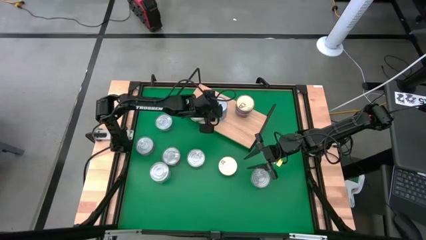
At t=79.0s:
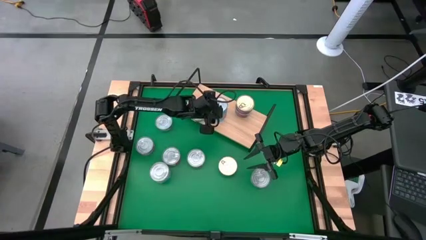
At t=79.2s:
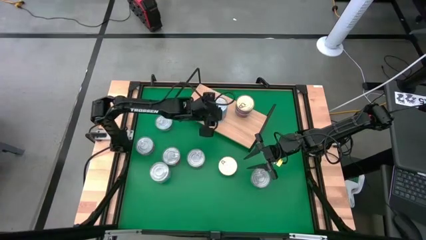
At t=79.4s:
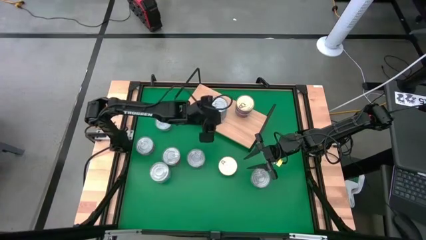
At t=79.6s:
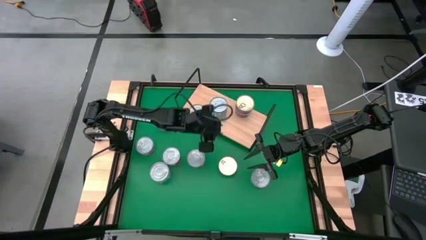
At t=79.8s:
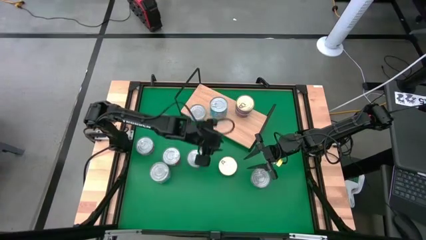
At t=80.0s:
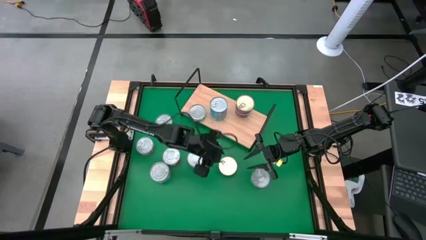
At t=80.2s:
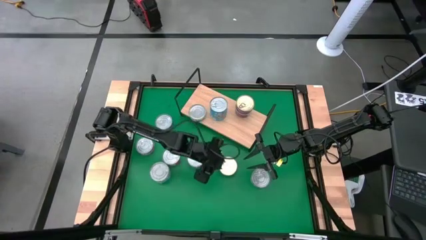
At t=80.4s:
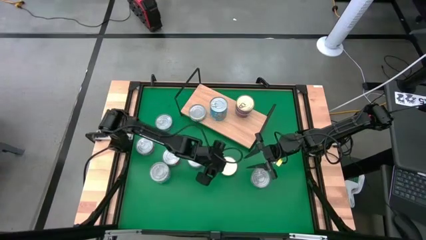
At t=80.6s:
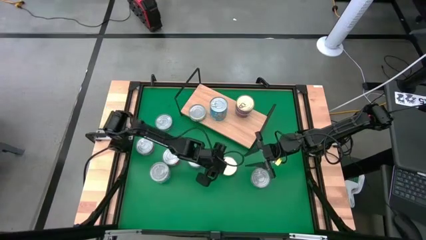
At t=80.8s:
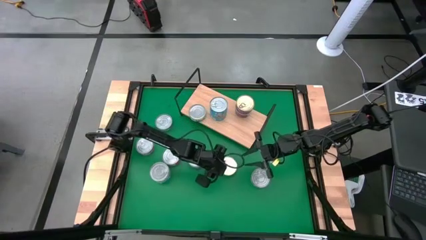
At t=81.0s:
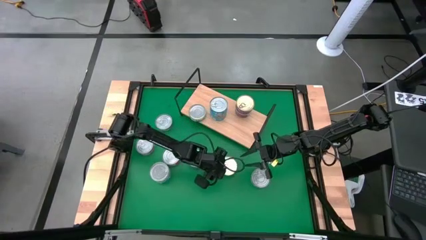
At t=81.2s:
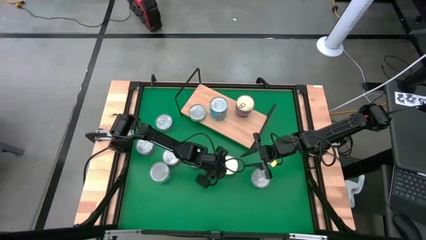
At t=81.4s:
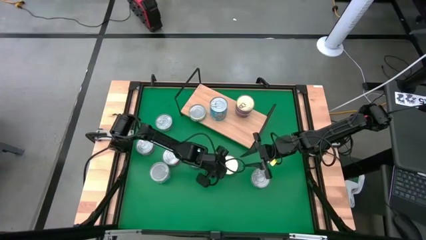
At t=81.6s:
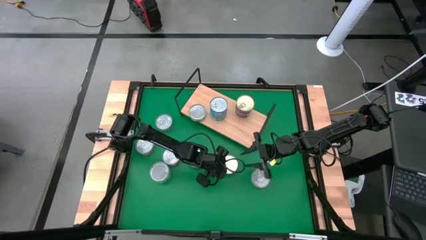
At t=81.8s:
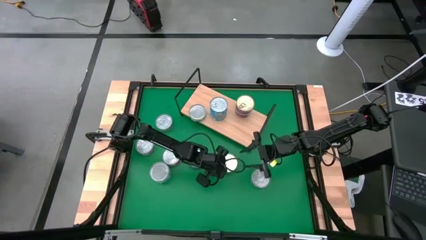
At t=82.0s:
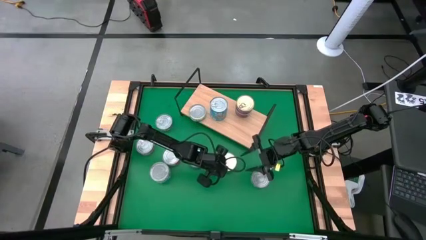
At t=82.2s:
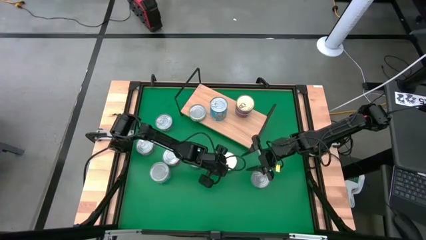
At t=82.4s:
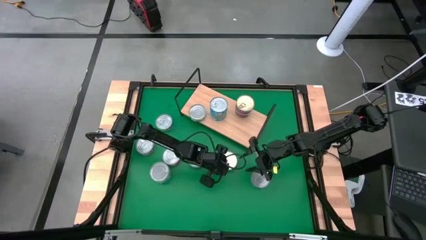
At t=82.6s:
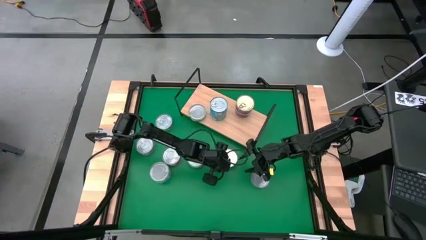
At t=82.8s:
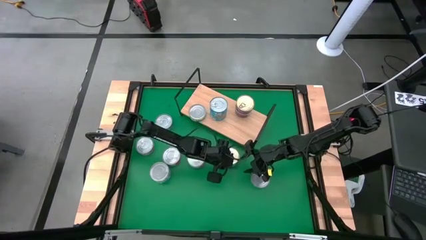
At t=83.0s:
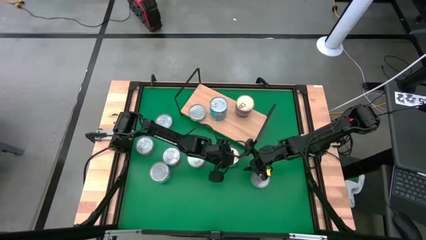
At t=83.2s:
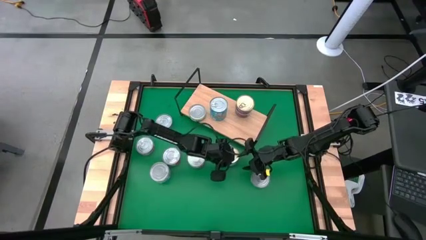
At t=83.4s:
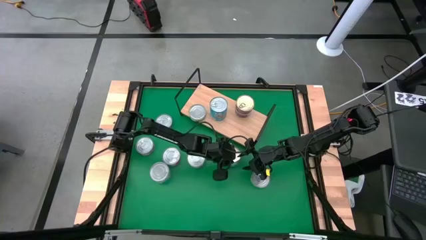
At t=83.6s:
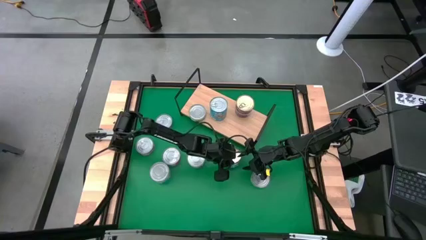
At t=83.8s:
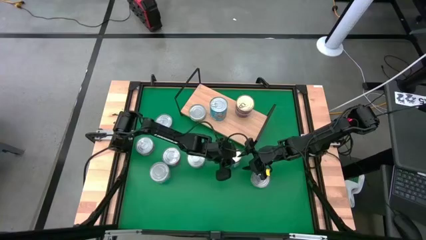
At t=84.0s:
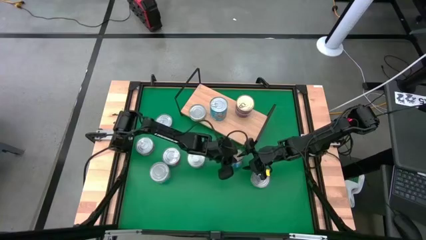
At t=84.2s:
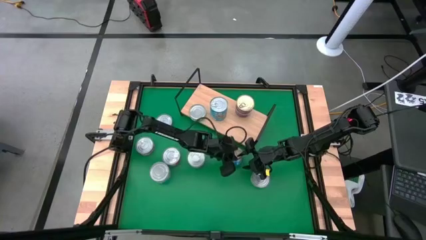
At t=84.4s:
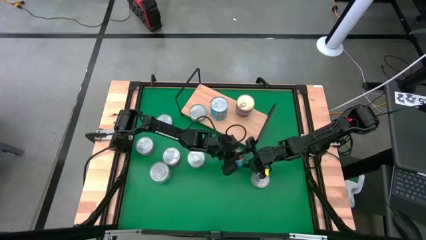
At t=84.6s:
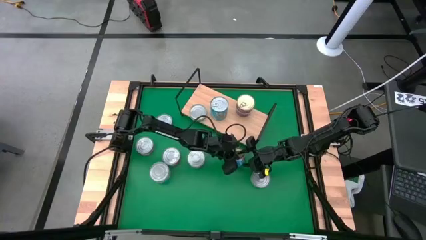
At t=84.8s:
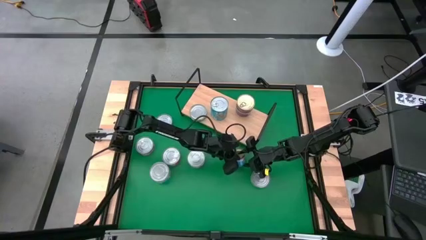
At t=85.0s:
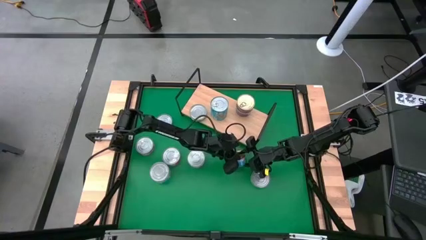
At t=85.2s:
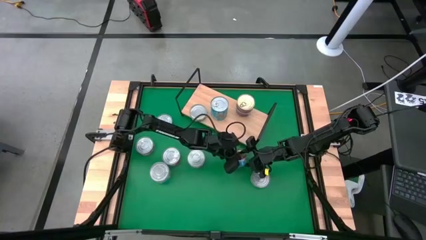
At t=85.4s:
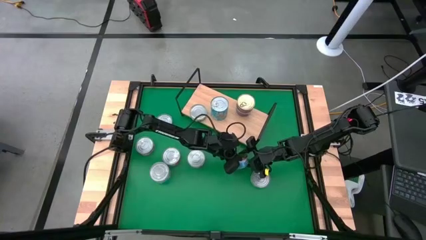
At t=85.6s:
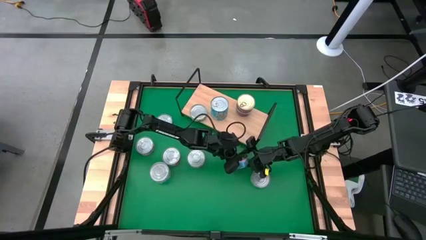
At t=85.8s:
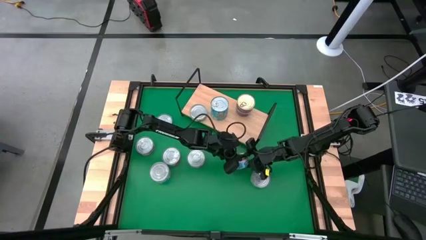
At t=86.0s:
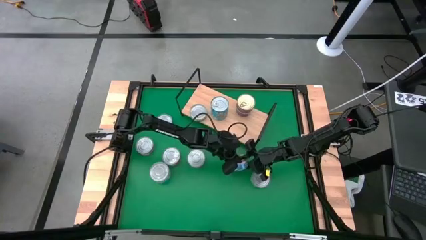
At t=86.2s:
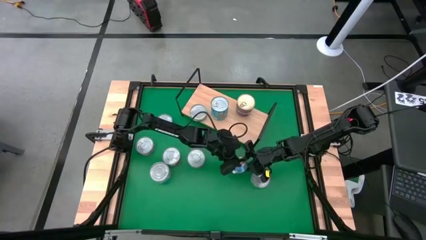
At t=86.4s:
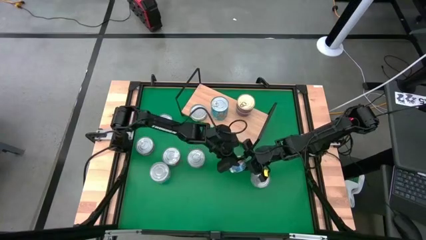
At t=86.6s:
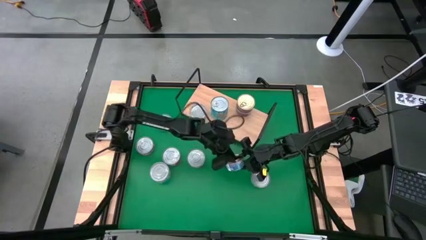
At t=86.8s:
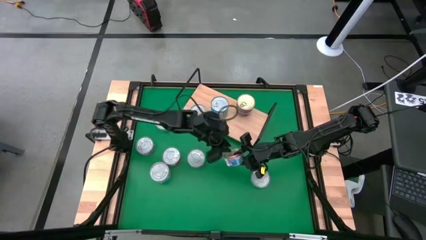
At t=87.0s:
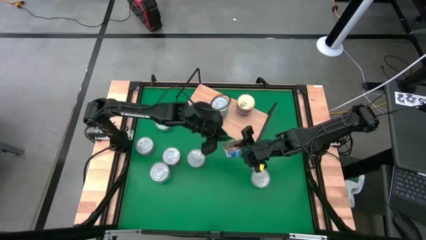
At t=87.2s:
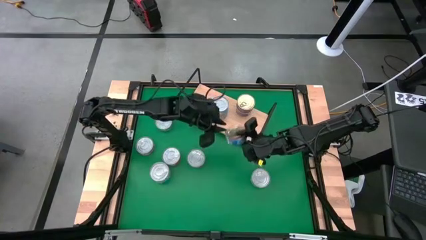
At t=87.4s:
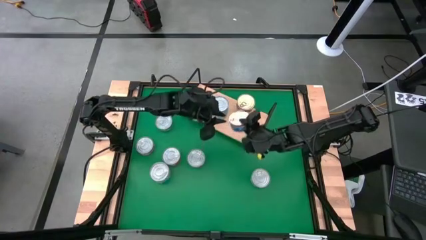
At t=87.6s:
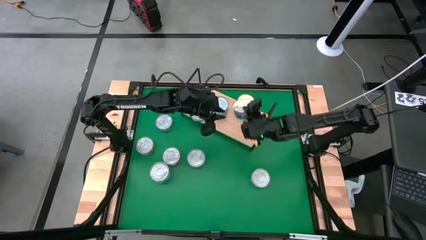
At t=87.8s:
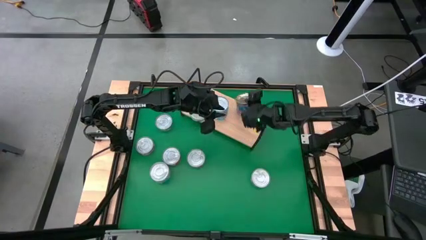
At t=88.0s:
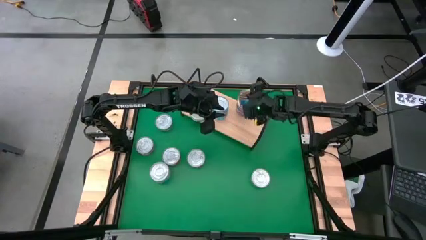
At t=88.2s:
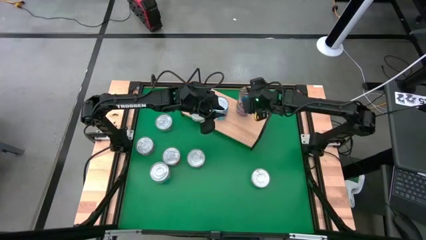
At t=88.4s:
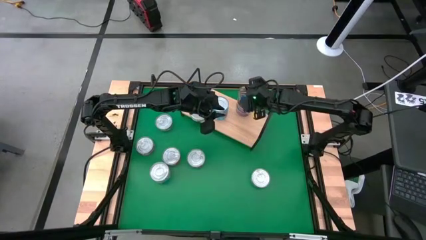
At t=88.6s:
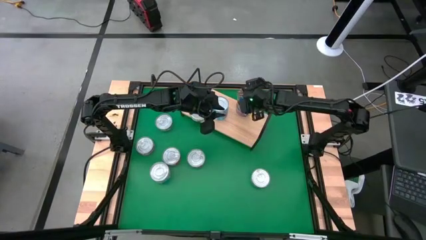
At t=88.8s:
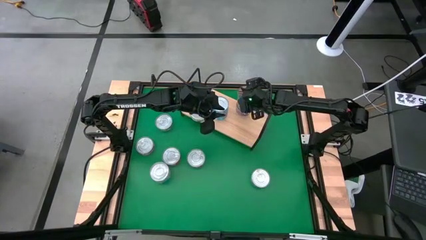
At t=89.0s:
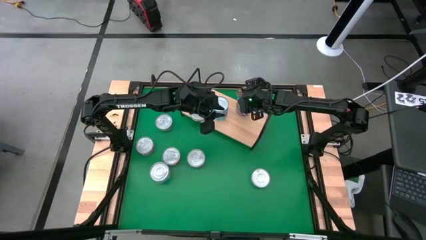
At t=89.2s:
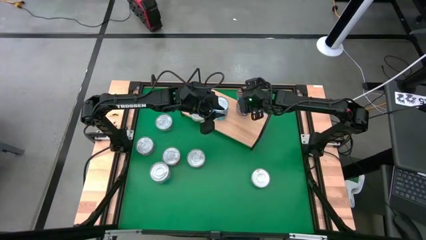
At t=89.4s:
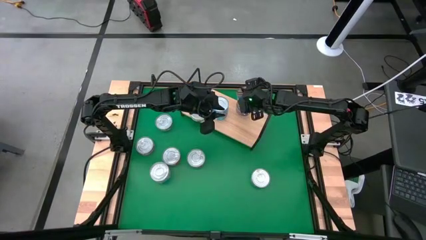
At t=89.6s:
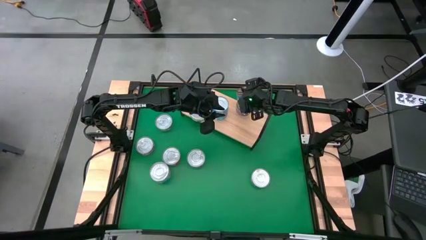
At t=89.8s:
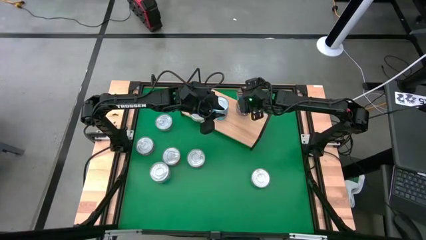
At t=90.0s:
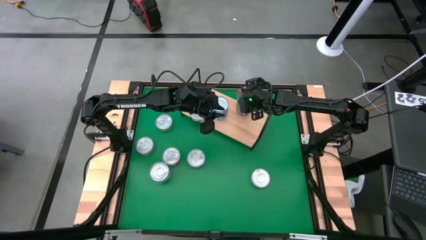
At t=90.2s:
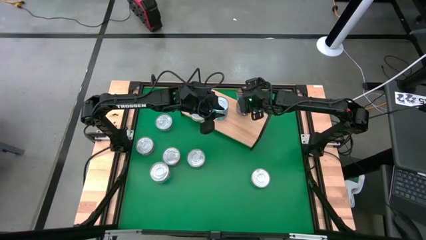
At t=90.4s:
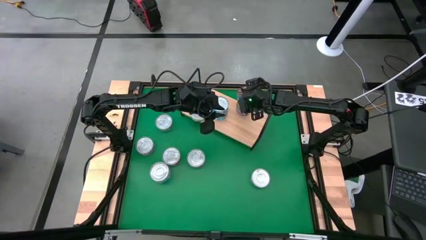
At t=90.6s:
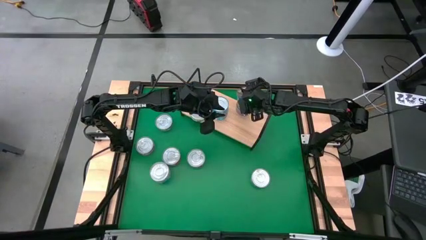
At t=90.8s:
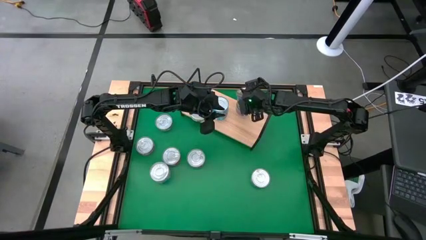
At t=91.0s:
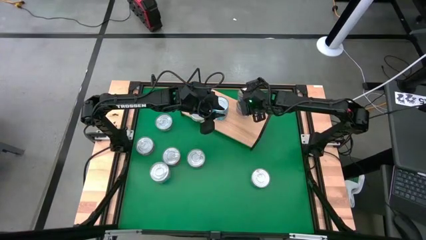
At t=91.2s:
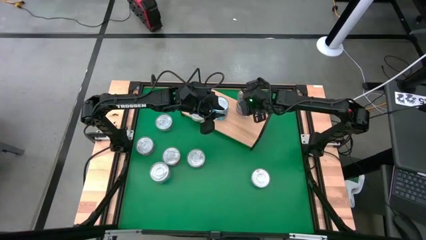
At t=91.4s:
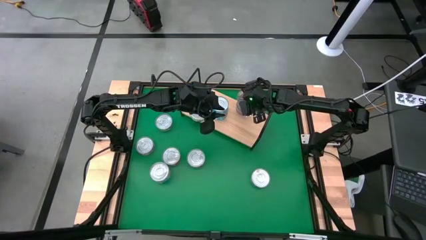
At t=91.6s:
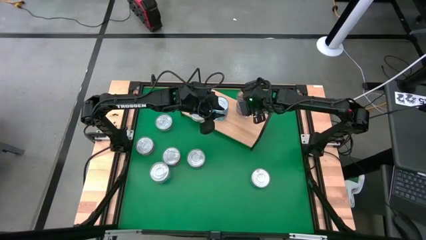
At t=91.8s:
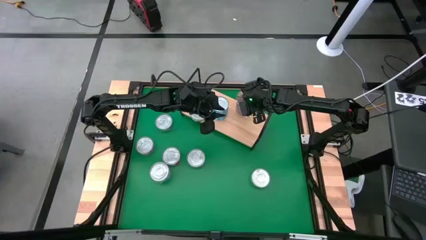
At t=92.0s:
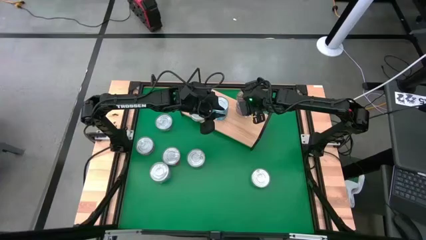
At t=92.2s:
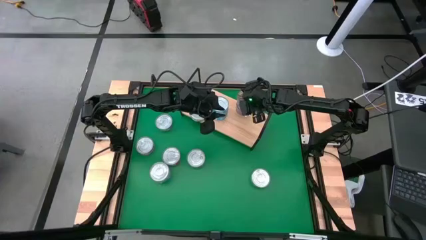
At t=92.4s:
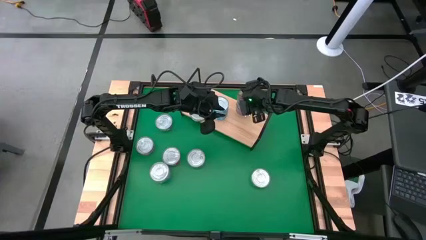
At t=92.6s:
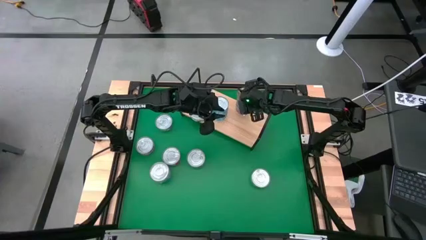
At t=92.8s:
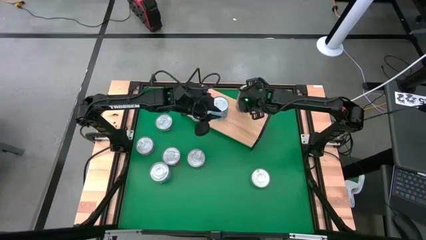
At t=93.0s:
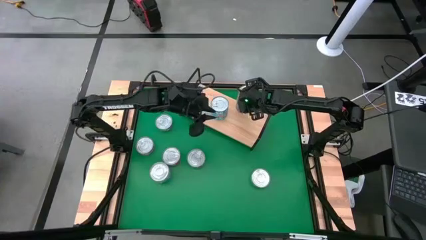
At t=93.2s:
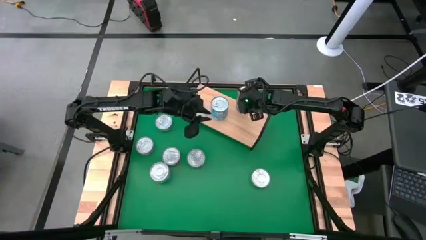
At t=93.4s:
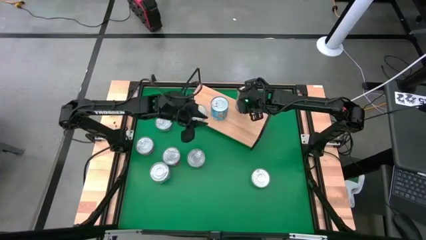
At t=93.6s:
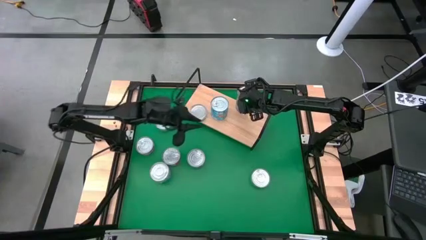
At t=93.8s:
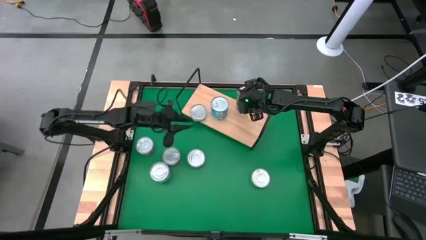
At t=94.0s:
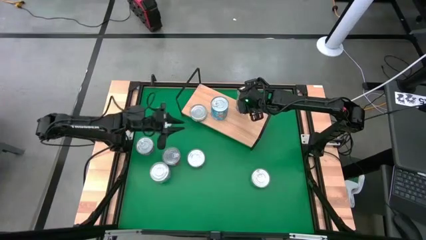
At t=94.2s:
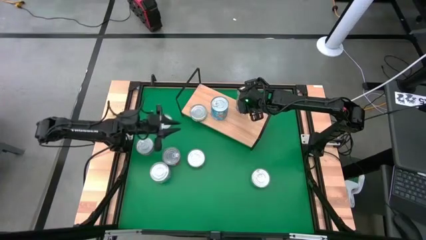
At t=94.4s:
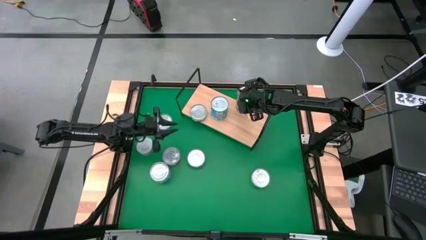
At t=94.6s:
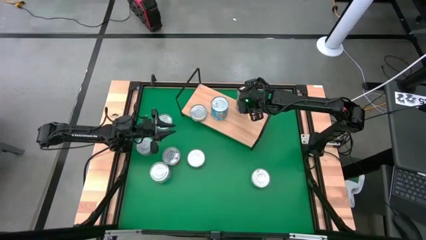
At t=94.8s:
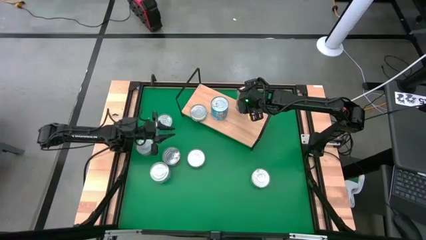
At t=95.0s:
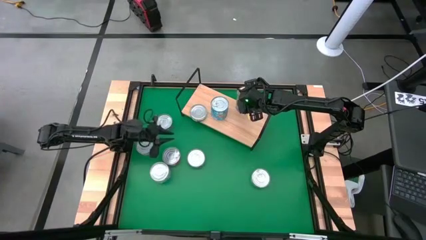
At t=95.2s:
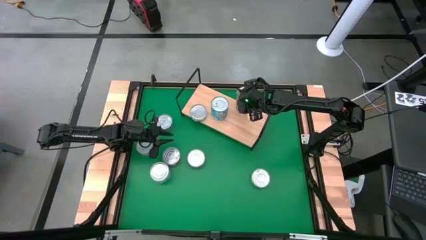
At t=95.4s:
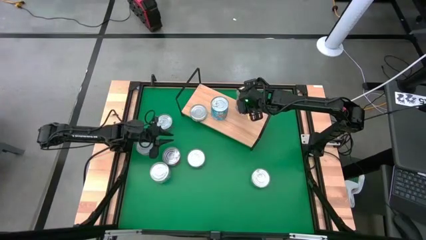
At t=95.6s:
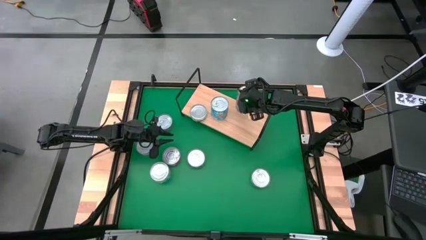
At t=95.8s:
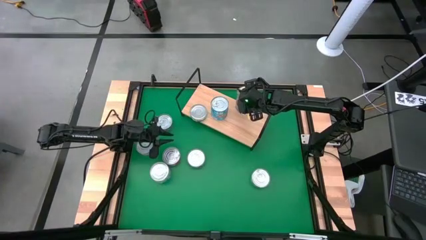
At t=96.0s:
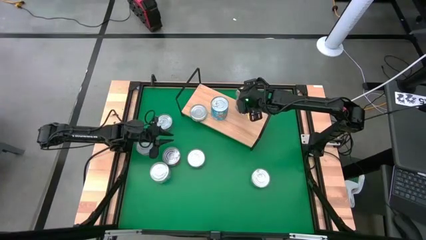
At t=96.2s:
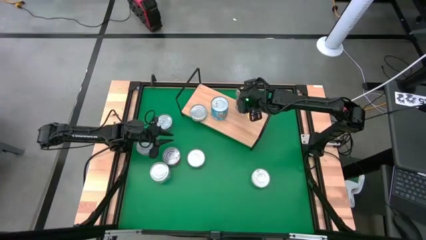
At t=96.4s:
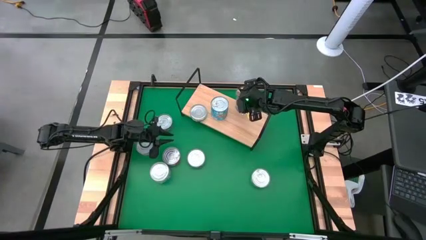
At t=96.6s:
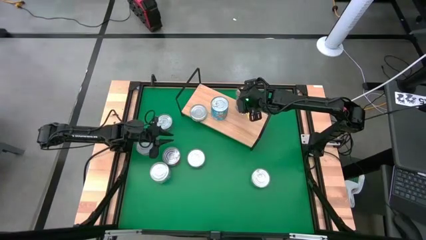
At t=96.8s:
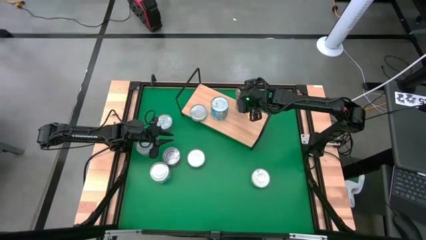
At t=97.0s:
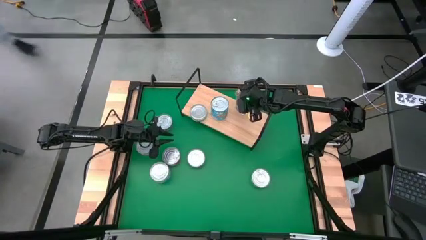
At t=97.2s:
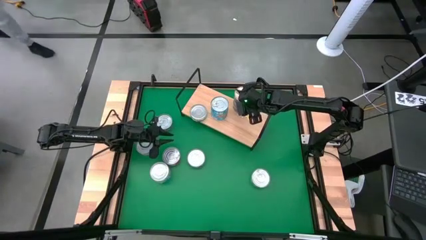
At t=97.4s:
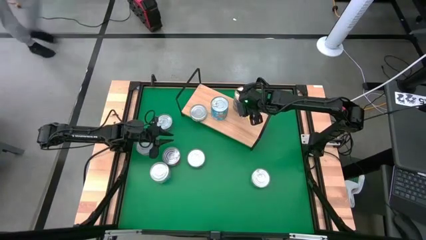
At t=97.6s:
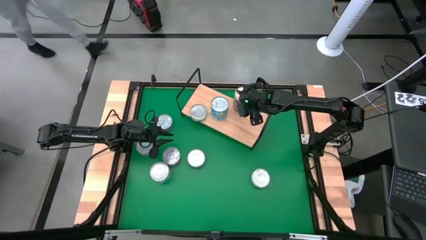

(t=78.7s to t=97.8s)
Task: Stack canned seafood by type on shelf
Stack the blue-pink tuna can on top of the blue-pink tuna can on the shelf
